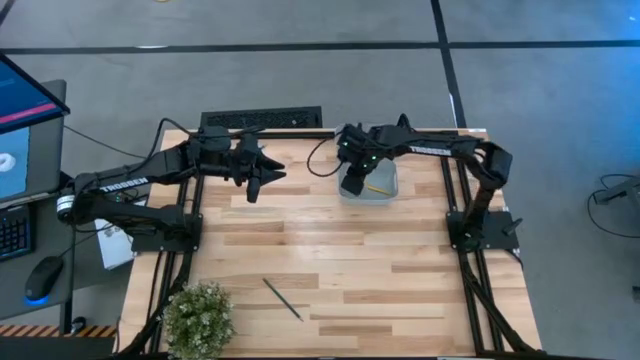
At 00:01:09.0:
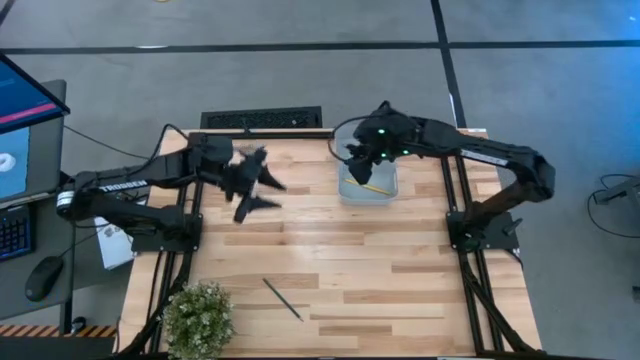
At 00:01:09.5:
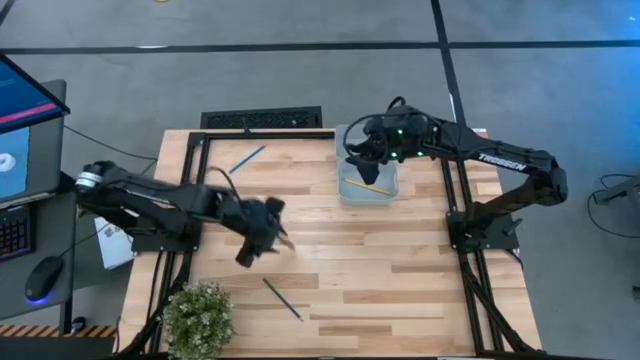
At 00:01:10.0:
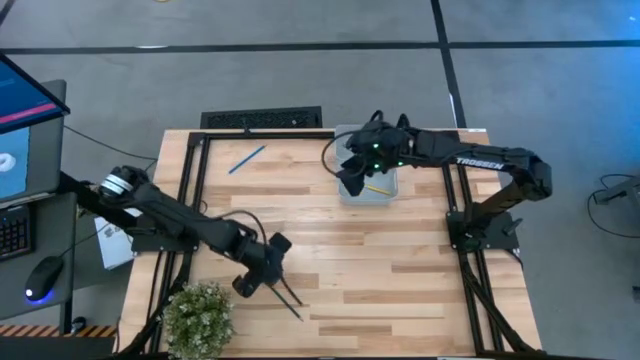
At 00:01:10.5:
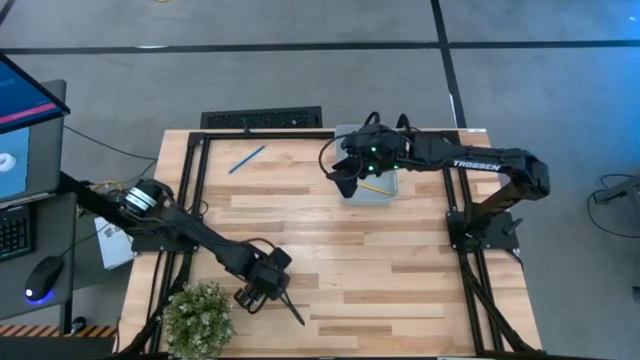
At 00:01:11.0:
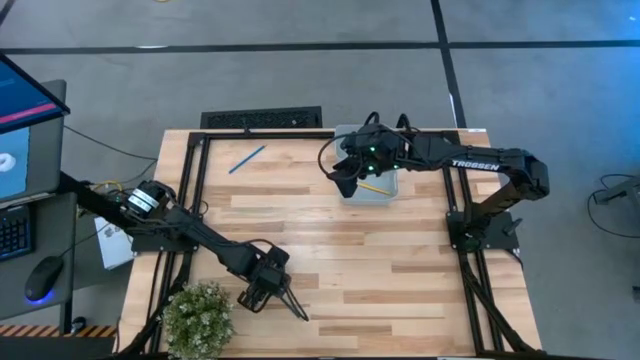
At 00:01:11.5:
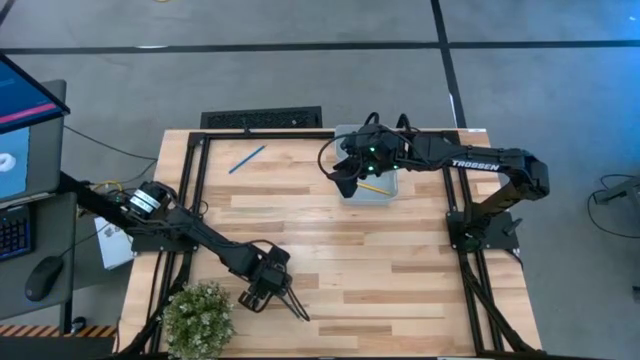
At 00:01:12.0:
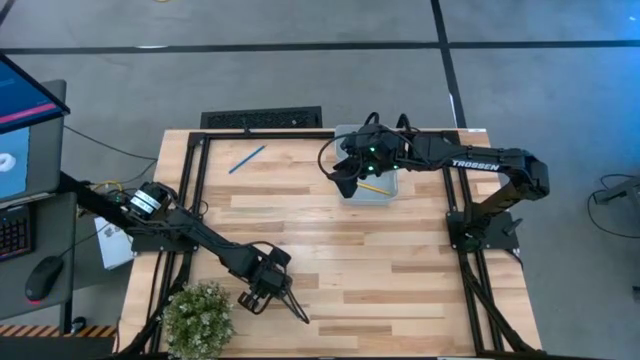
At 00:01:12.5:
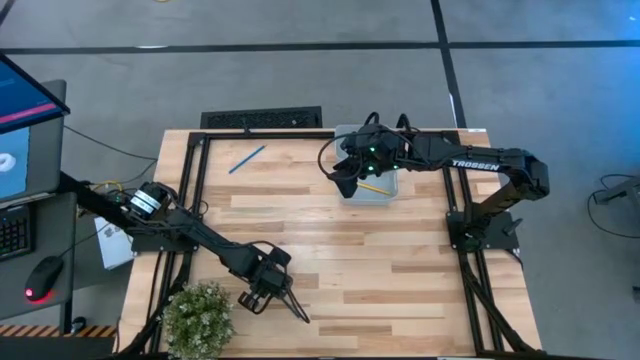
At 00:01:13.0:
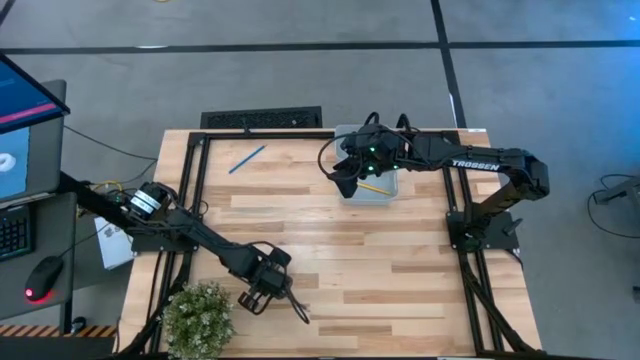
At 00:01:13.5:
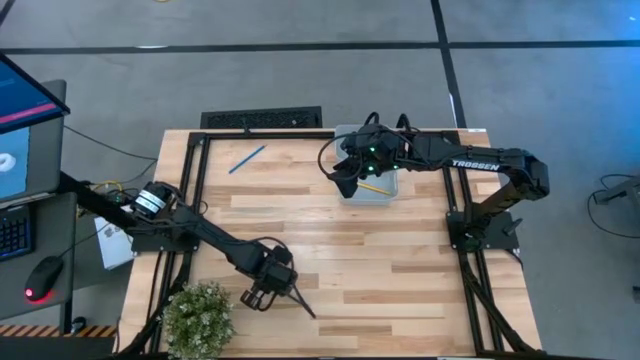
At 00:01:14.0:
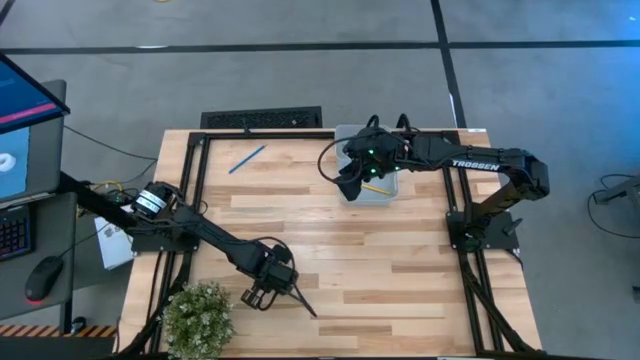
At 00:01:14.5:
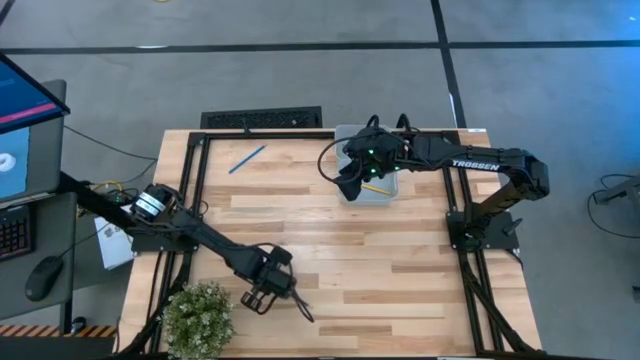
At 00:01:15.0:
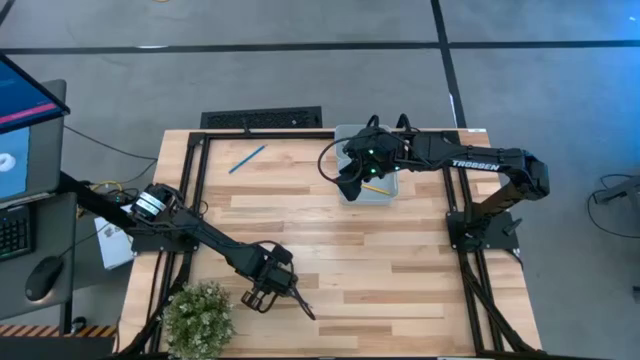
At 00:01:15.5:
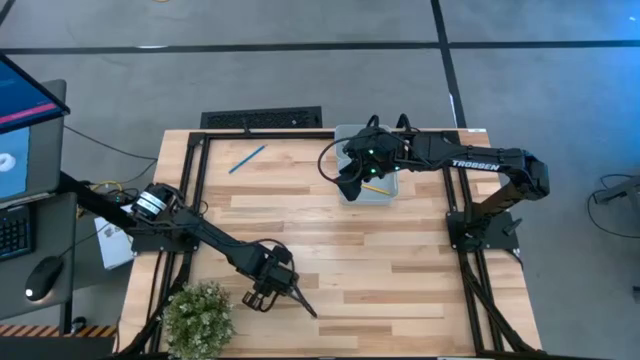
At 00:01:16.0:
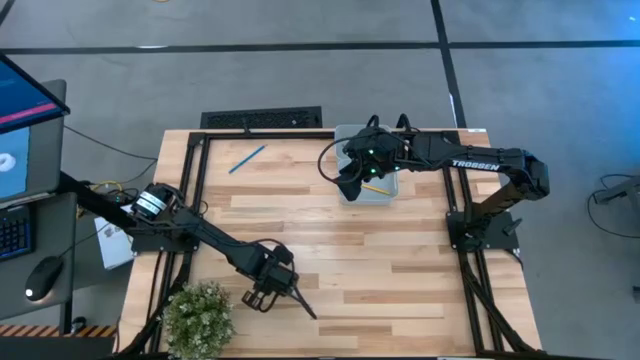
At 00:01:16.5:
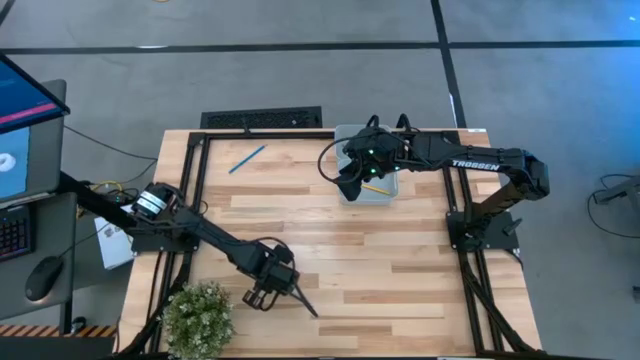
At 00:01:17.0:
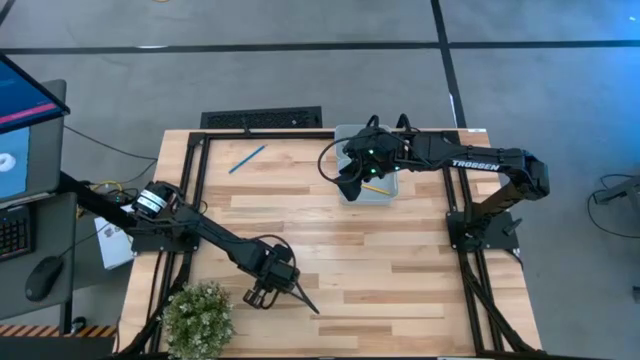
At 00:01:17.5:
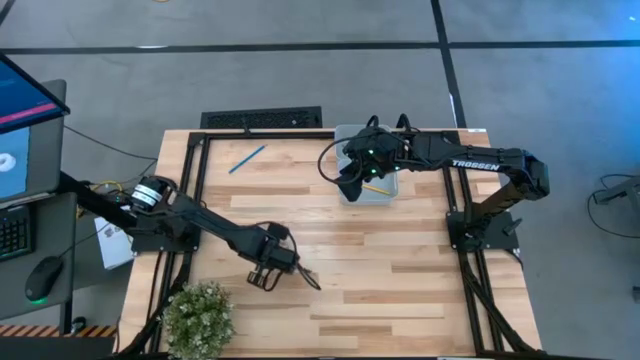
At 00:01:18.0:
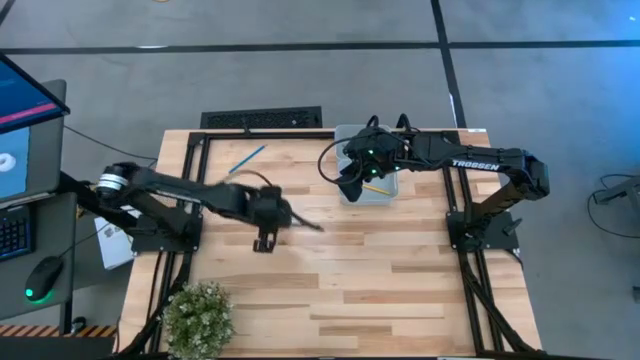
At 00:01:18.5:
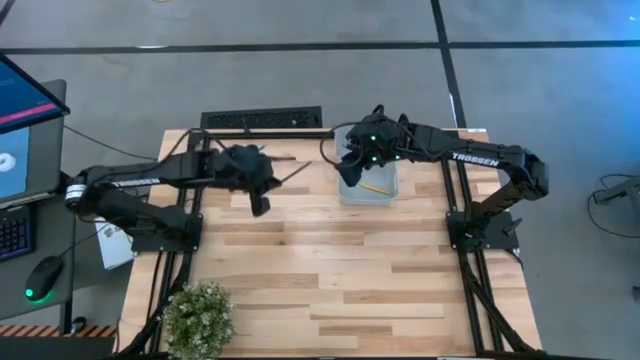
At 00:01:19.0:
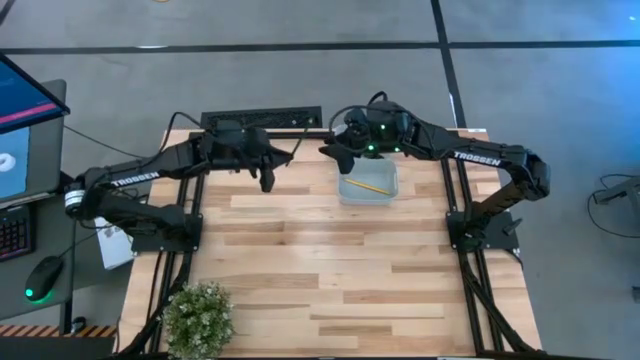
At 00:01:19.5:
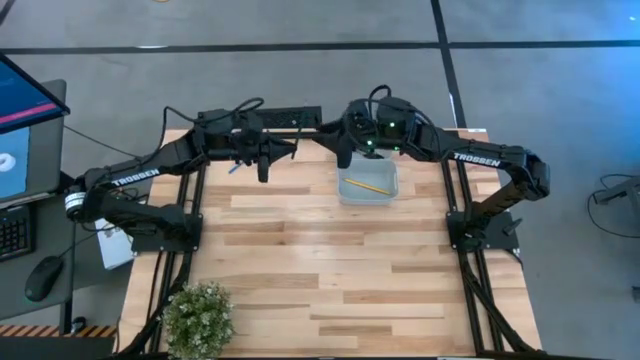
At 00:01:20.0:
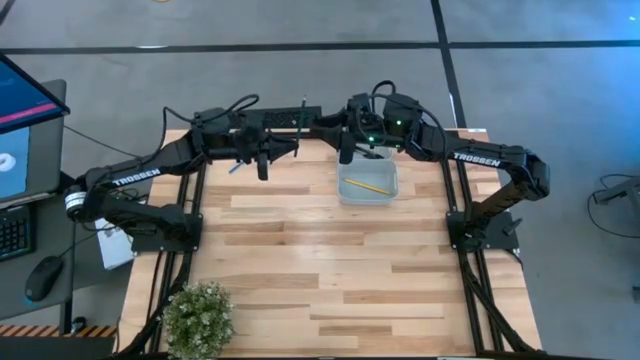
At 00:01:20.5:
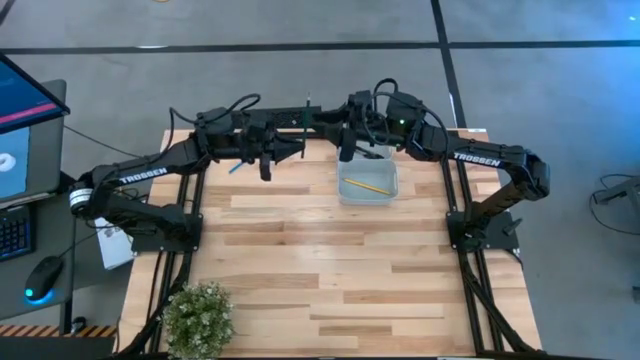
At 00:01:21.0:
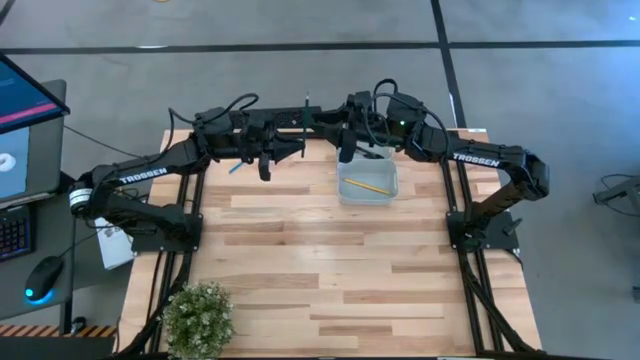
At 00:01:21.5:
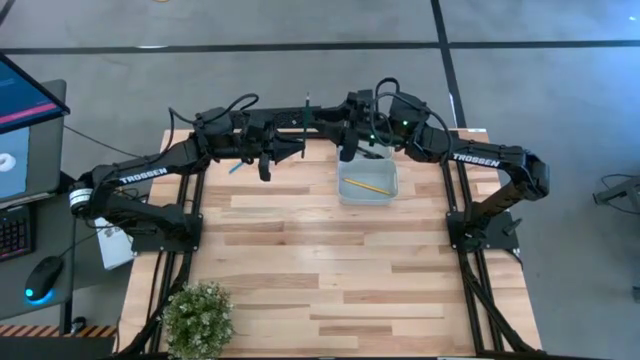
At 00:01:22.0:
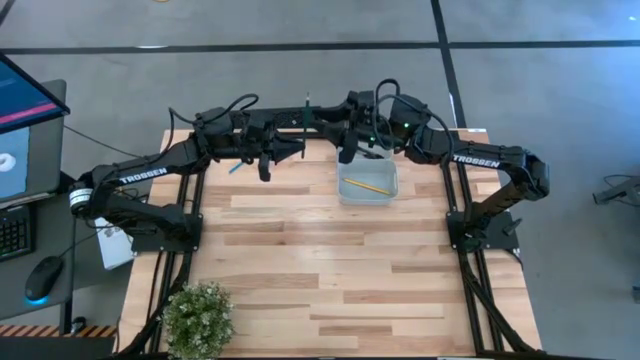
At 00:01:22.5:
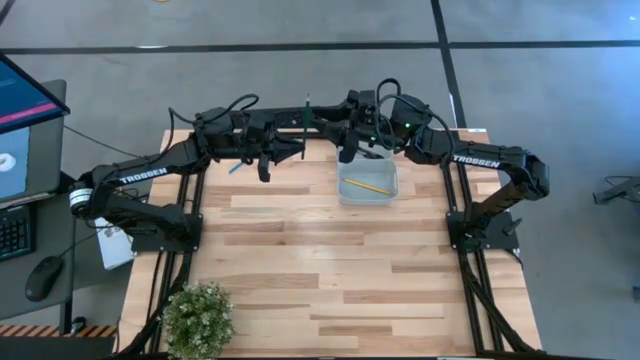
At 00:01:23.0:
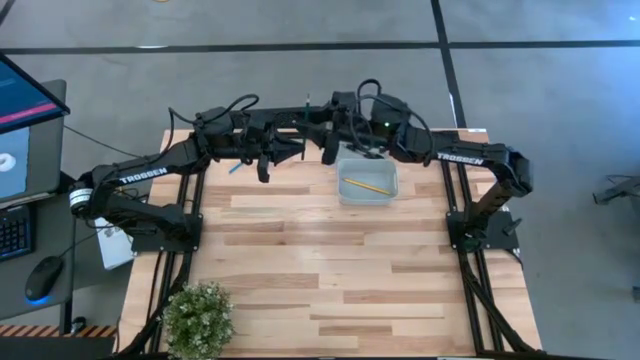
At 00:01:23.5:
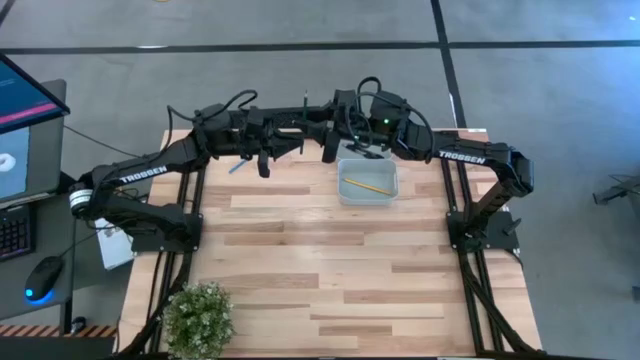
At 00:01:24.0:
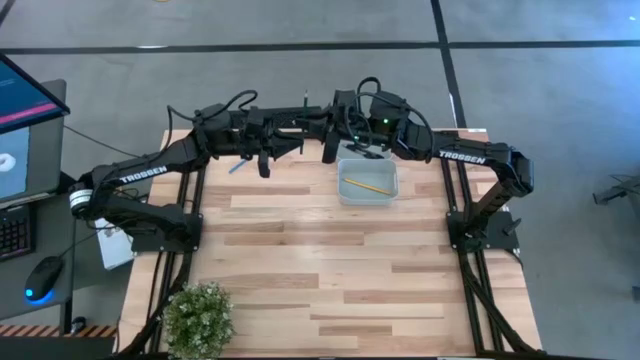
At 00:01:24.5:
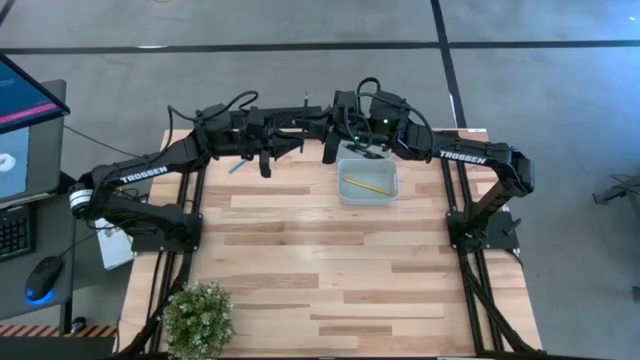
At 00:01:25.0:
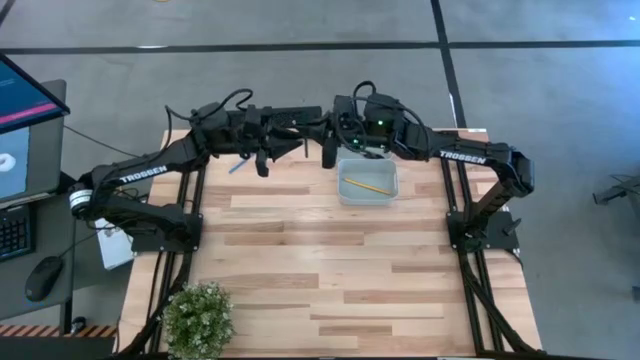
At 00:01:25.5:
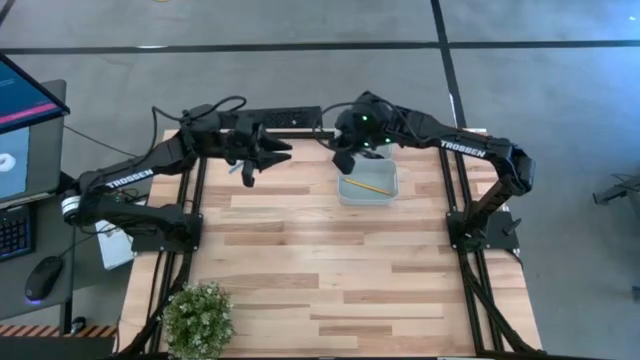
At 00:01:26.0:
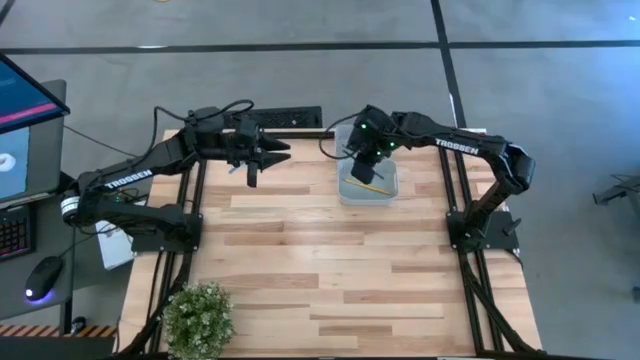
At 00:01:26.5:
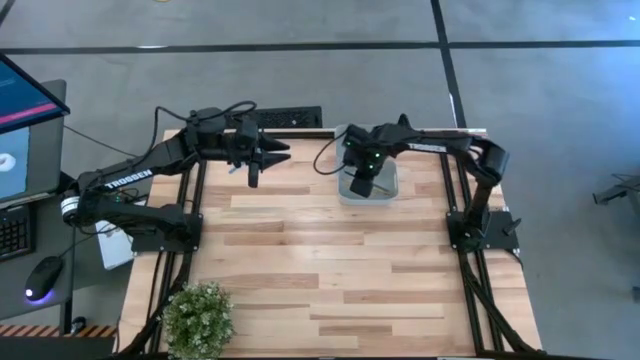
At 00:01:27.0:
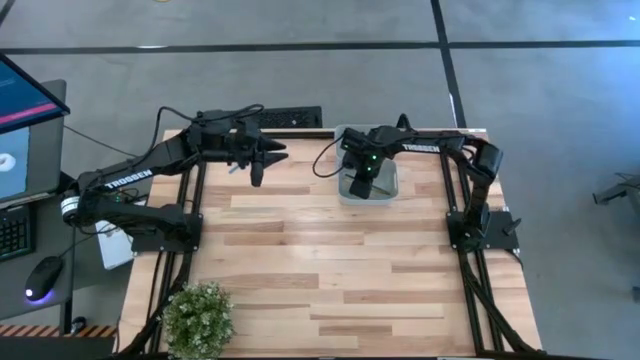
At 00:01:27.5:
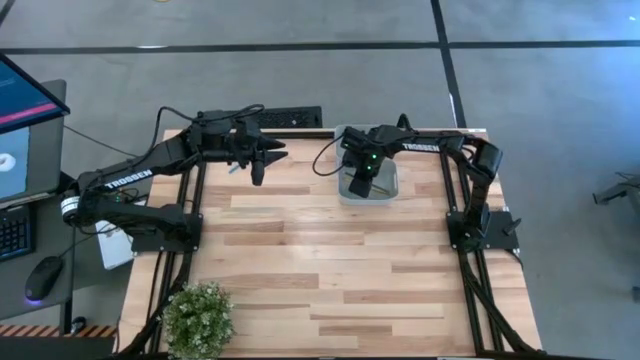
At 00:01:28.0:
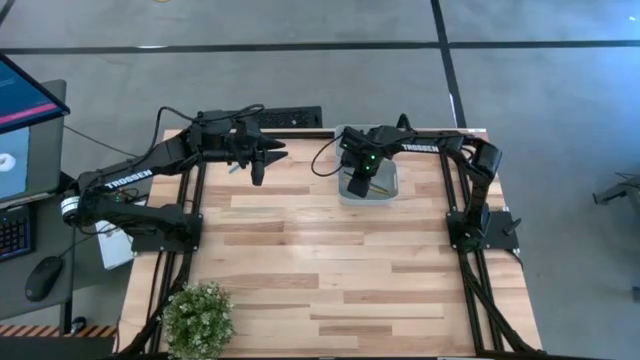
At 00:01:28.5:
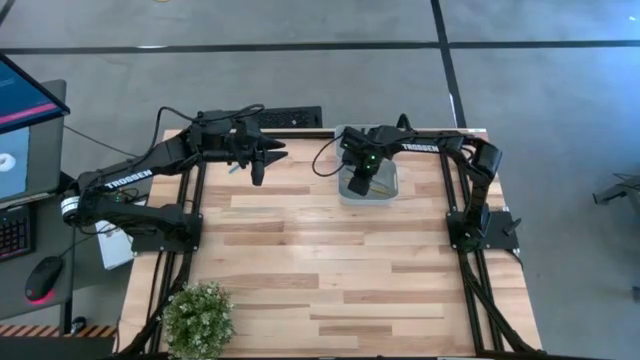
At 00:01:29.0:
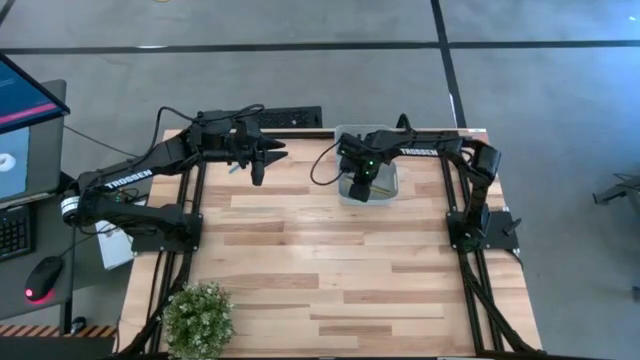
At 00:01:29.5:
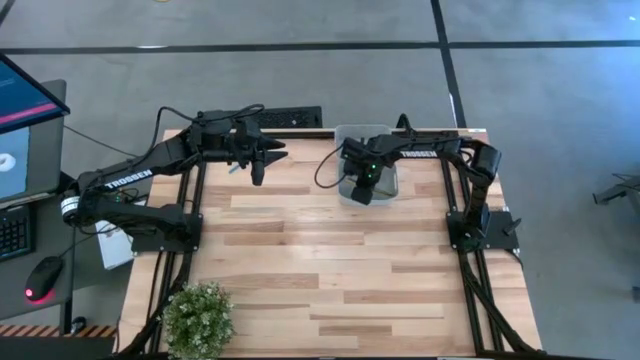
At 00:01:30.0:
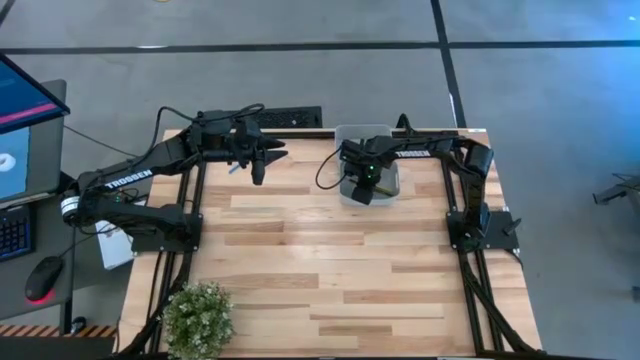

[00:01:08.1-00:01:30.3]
Task: Sort pens & pencils
Put the green pencil into the bottom bin
